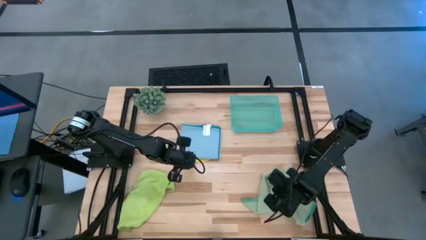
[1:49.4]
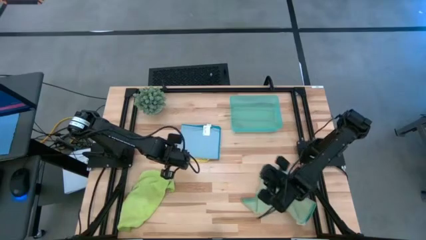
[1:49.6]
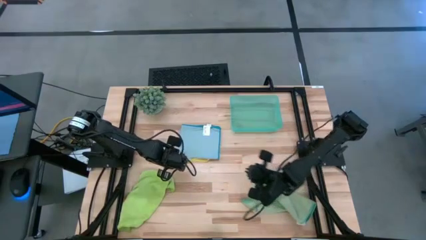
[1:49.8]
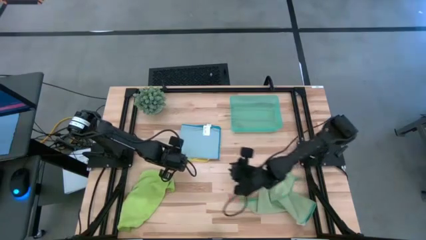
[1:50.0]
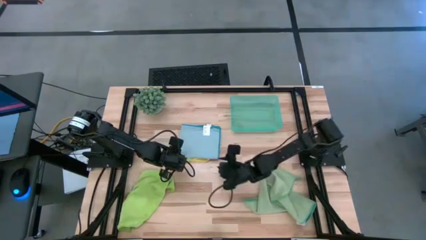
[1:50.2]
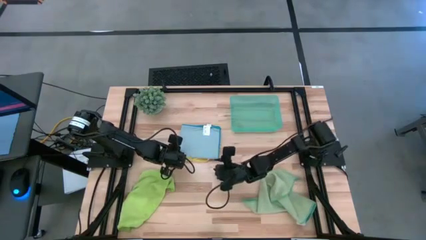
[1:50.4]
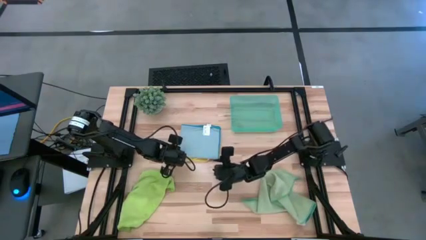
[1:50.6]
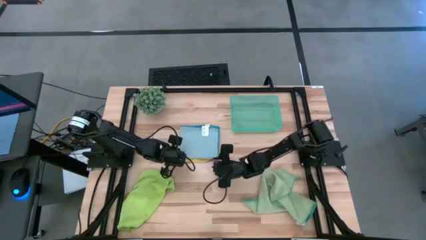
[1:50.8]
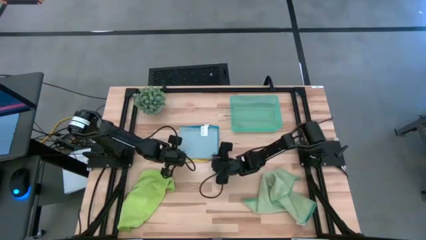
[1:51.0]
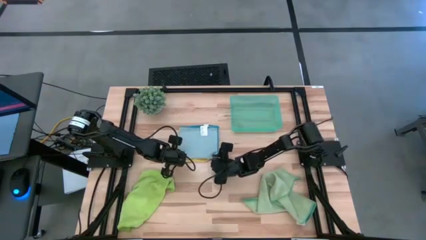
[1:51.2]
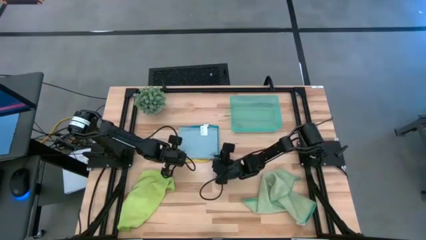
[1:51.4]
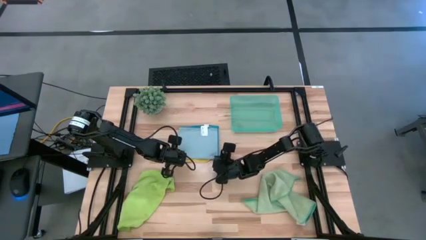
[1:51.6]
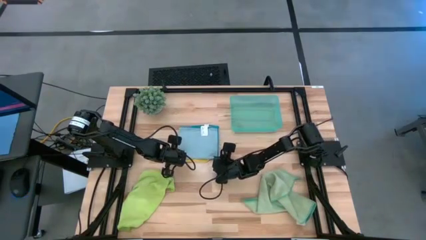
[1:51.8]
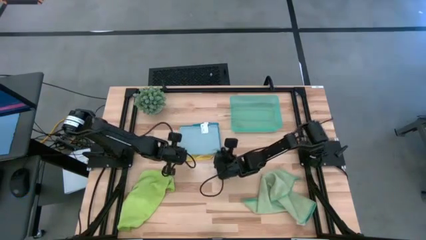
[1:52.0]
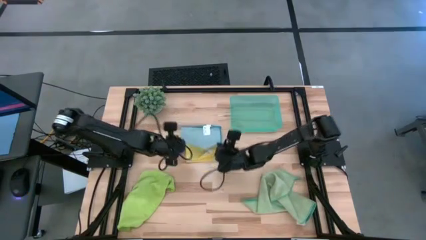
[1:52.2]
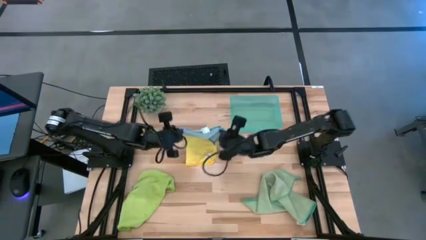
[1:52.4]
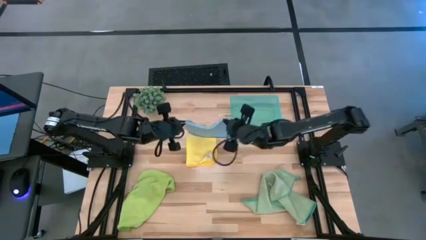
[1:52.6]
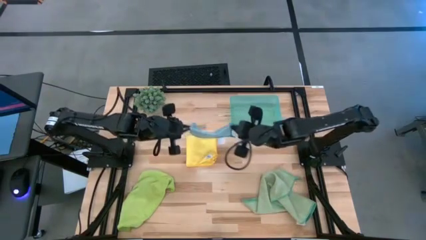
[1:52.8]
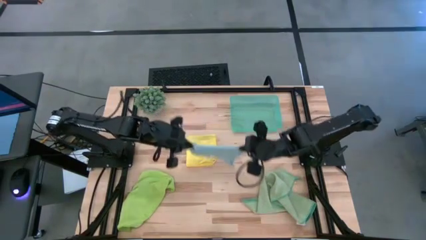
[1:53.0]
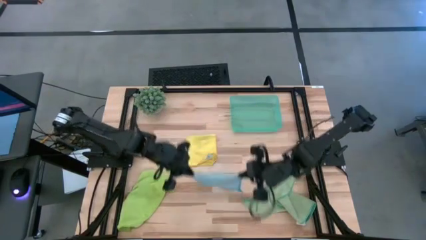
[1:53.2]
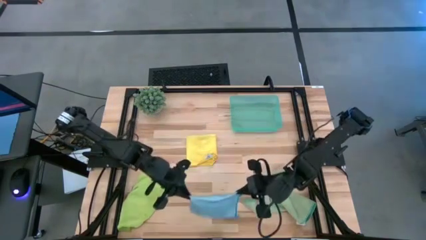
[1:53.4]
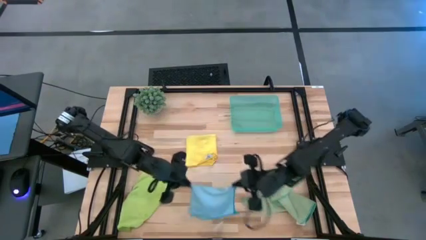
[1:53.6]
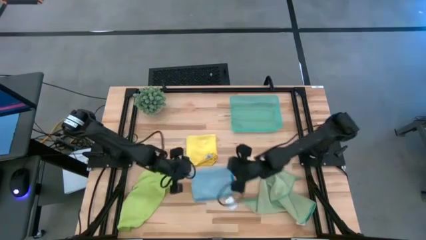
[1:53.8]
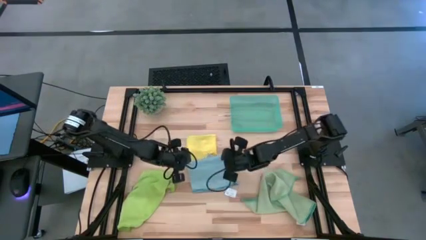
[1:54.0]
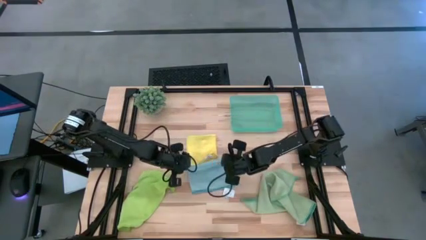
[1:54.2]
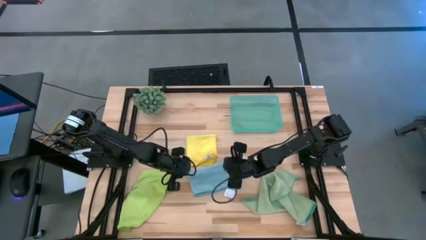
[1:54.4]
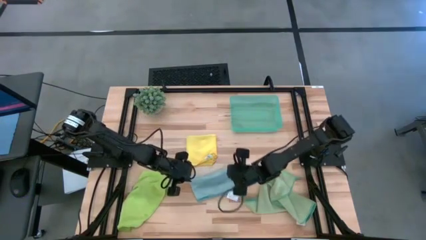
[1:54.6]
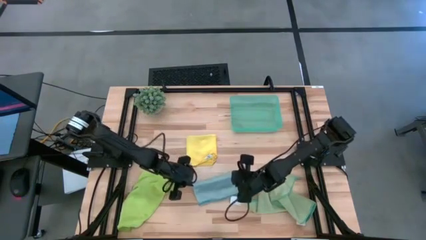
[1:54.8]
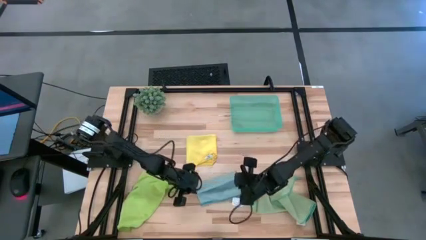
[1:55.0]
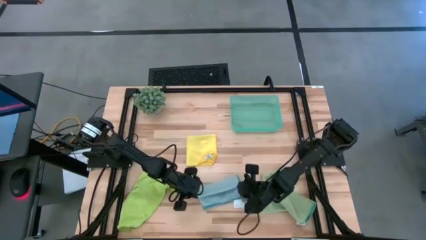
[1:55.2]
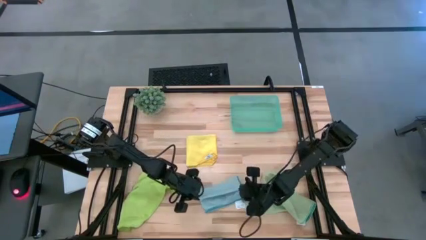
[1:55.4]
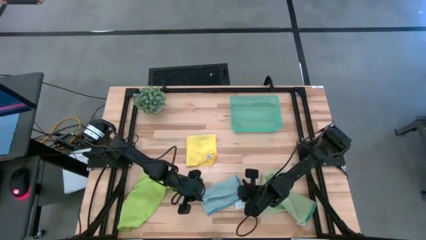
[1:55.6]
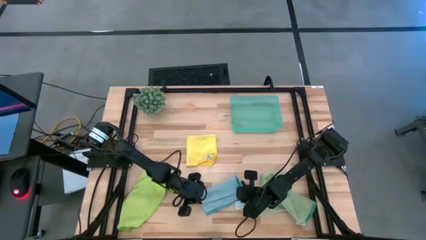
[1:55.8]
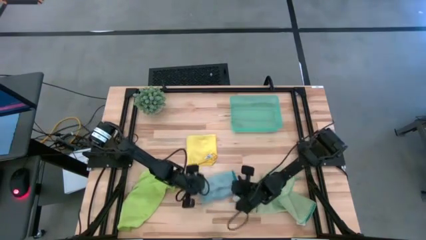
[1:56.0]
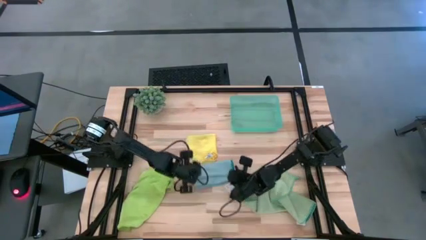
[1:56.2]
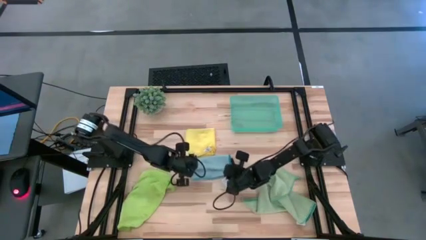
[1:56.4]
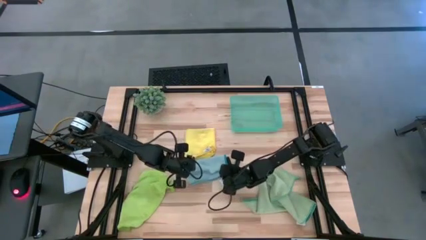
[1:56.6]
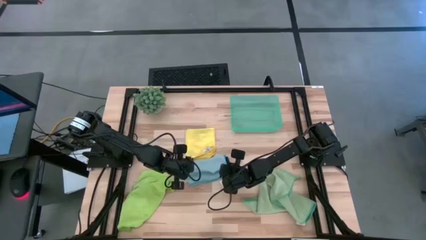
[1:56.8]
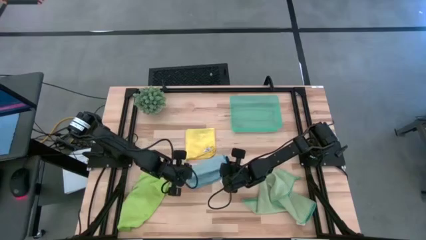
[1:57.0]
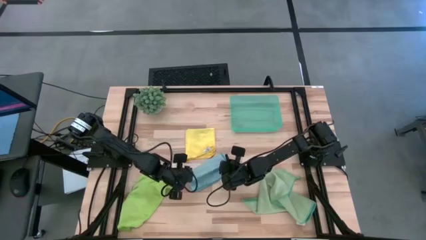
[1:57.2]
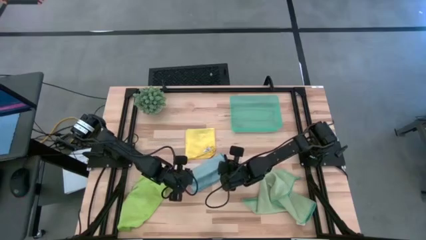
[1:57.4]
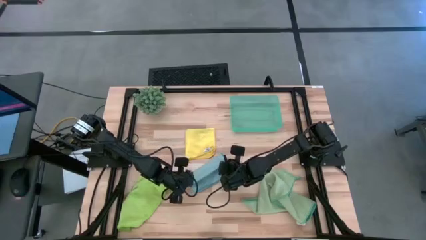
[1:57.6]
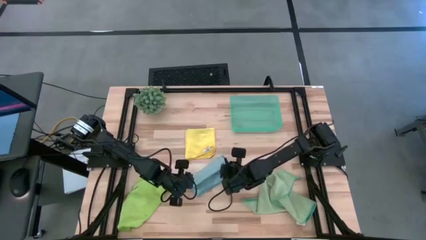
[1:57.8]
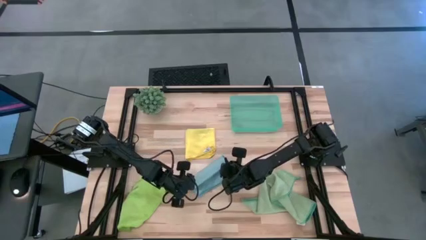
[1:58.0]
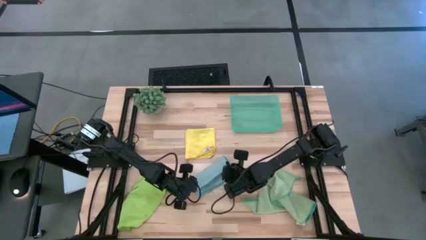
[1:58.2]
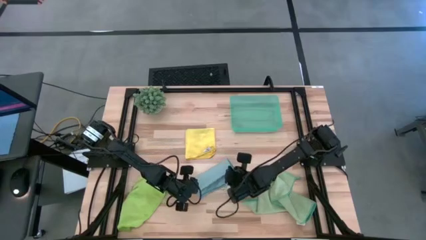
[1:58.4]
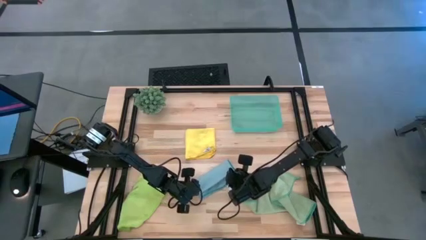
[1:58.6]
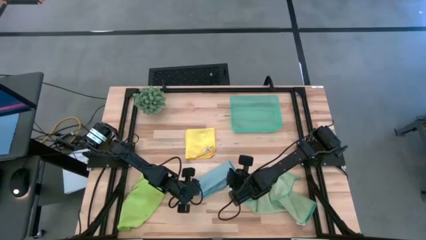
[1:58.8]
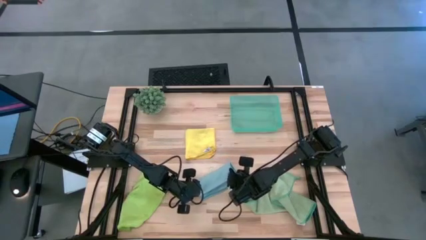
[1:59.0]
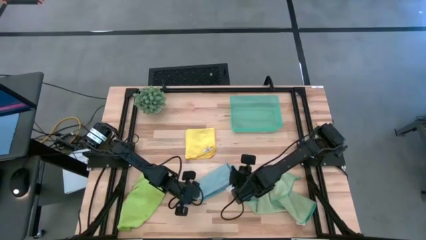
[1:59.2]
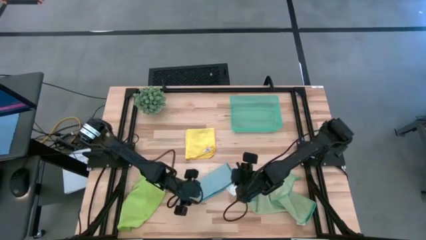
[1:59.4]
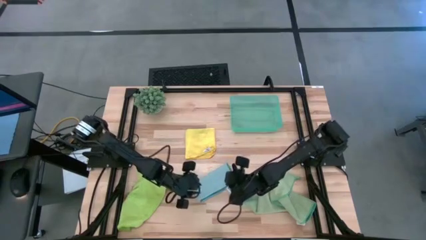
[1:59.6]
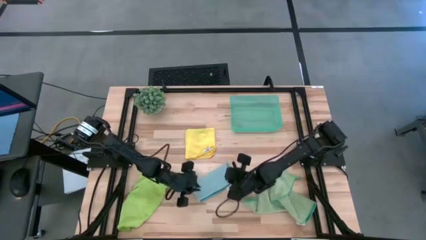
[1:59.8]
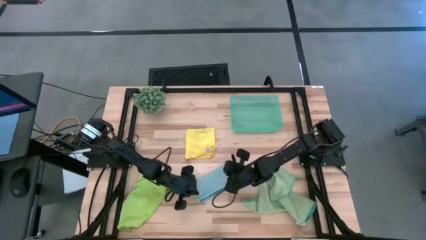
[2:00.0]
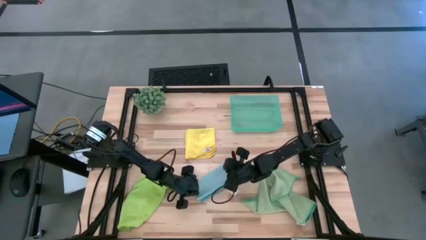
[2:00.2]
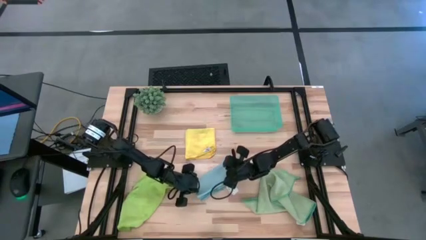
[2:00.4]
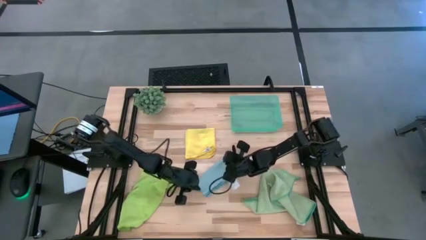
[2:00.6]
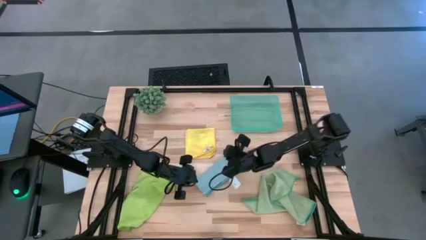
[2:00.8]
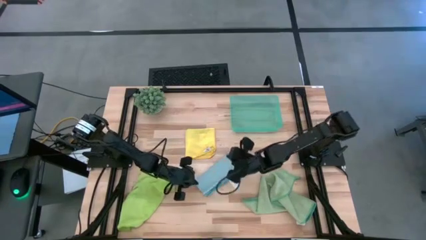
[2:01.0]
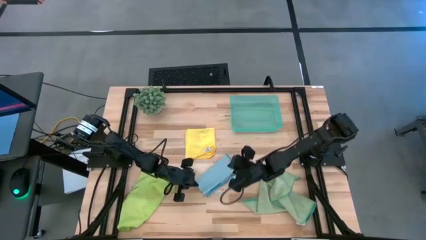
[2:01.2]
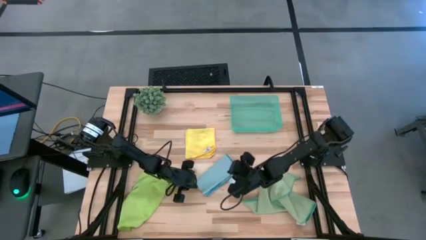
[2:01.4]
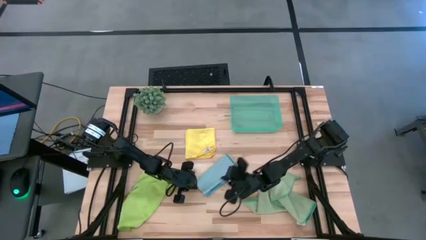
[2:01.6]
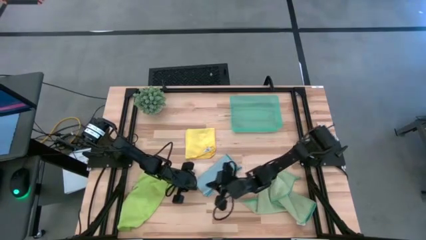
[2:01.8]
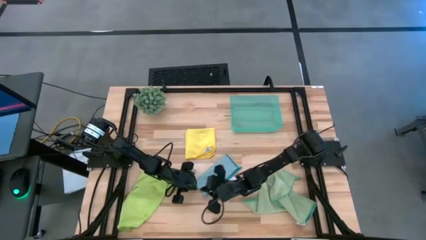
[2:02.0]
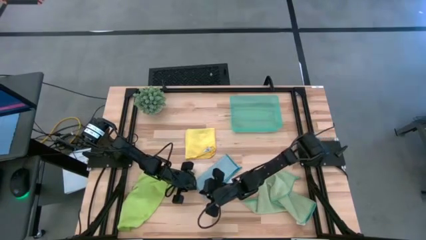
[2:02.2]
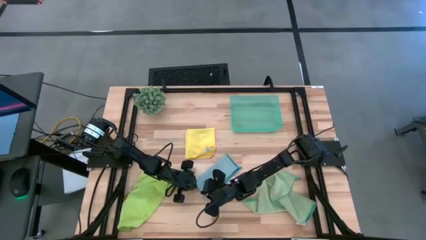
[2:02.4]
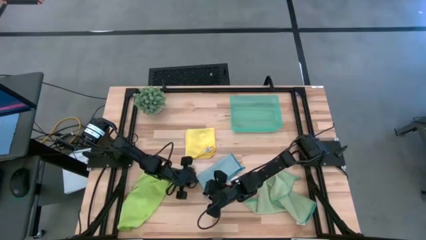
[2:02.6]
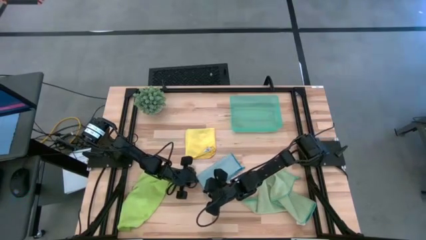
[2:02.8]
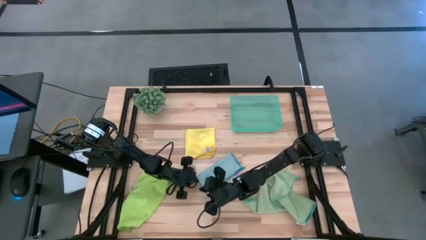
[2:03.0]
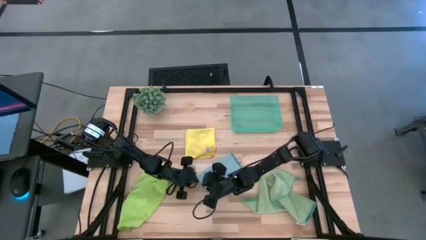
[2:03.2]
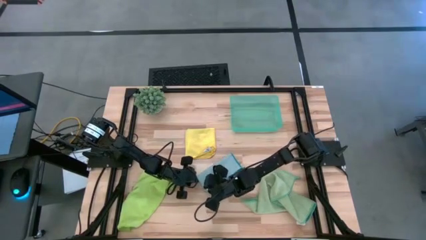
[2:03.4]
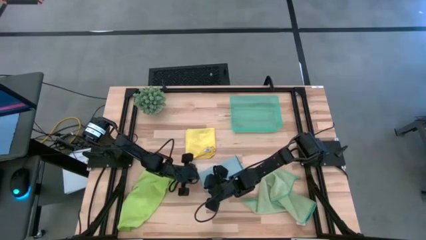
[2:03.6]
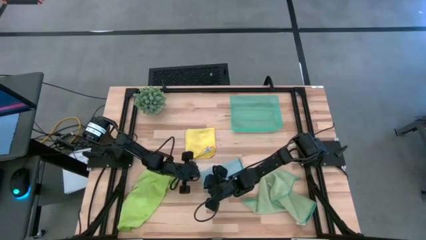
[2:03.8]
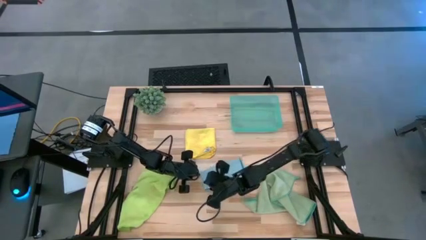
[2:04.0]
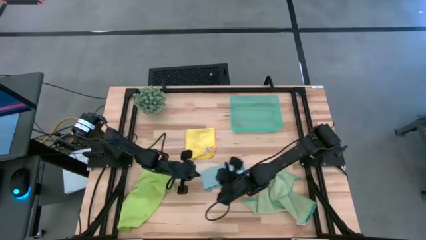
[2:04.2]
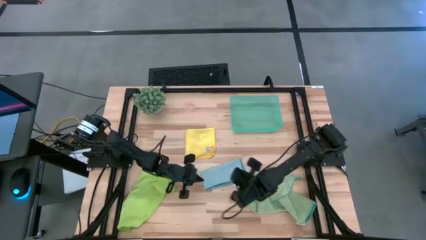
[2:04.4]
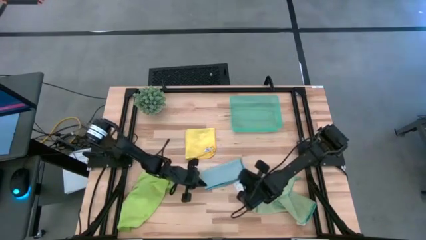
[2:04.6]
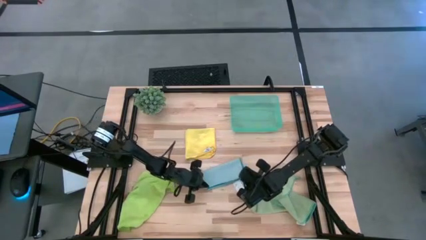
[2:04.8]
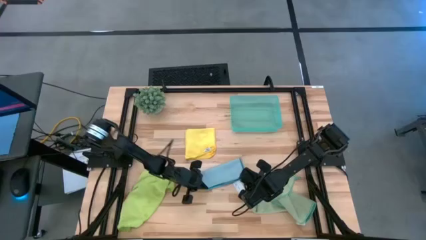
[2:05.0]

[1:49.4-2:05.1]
Task: Fold microfiber towels
Fold the blue microfiber cloth

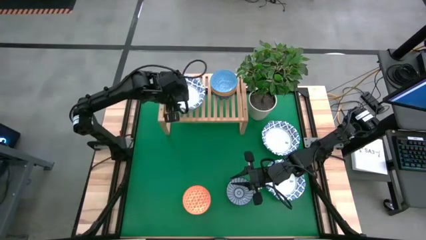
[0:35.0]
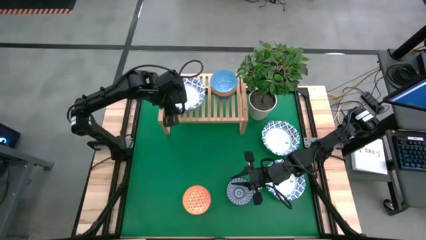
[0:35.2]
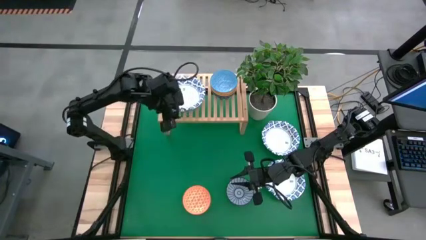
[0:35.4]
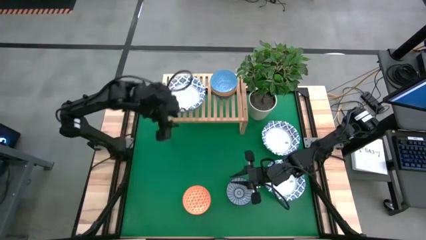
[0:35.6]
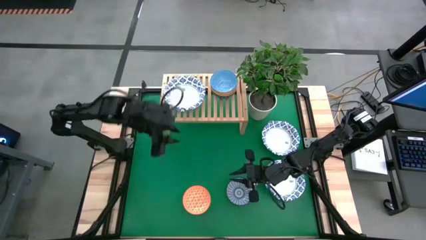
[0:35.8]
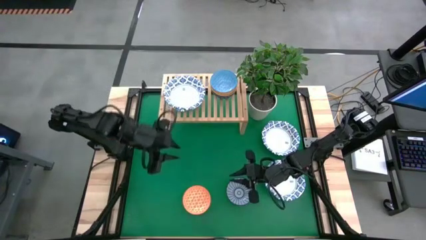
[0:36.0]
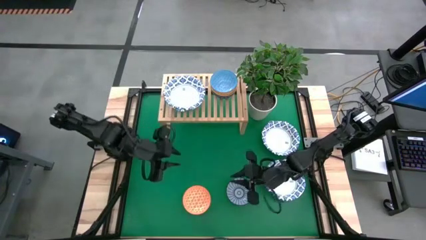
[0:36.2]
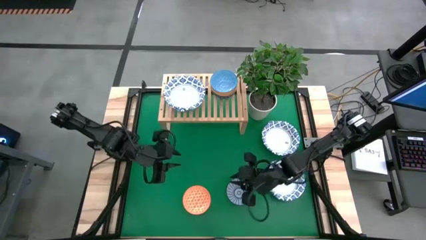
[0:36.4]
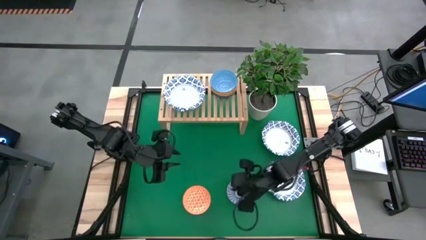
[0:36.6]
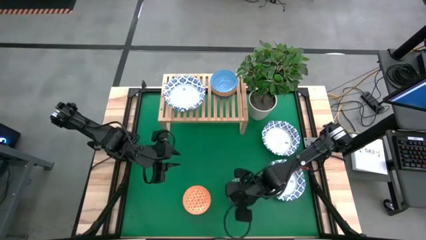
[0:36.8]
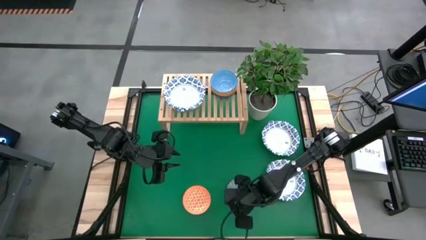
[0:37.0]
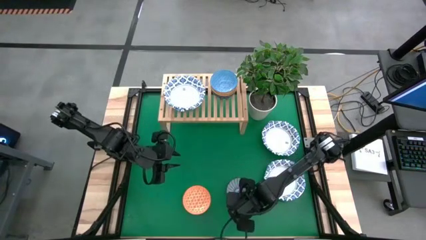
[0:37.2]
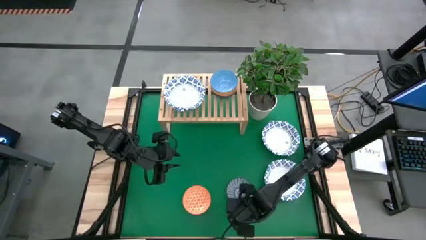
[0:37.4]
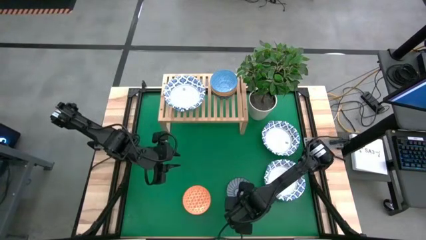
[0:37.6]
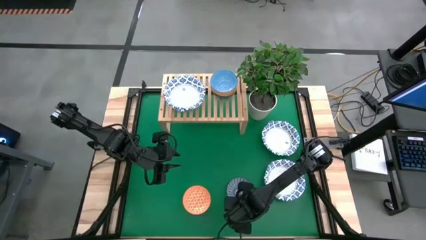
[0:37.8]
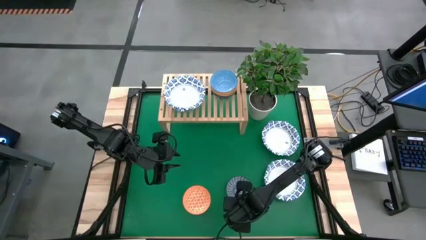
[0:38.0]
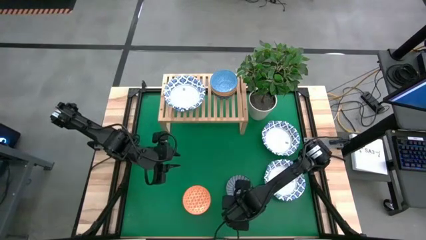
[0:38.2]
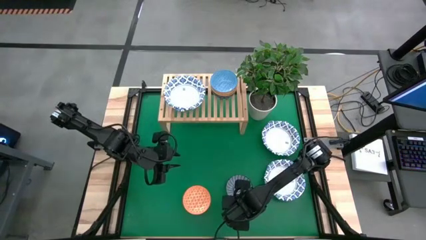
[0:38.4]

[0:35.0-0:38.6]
Task: Place and stack bowls onto a shelf
Stack the small blue bowl on the small light blue bowl on the shelf
